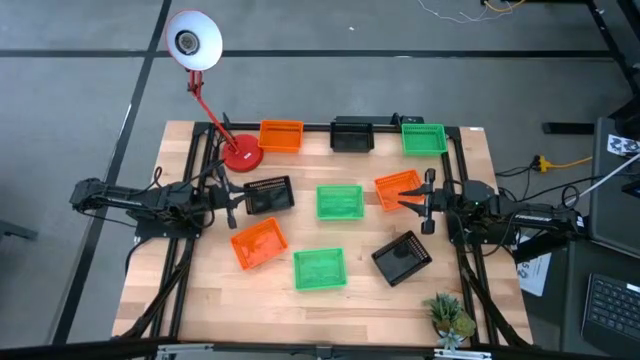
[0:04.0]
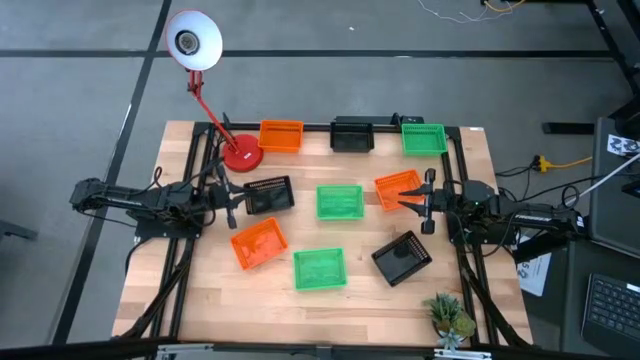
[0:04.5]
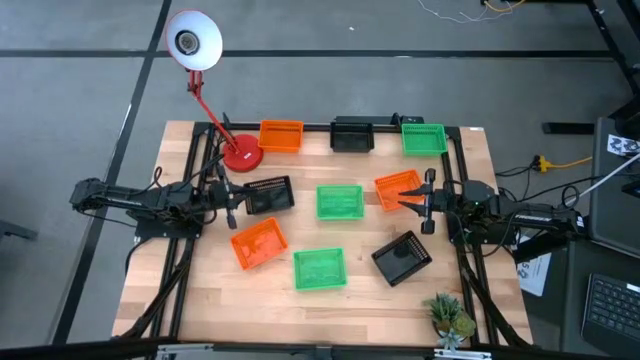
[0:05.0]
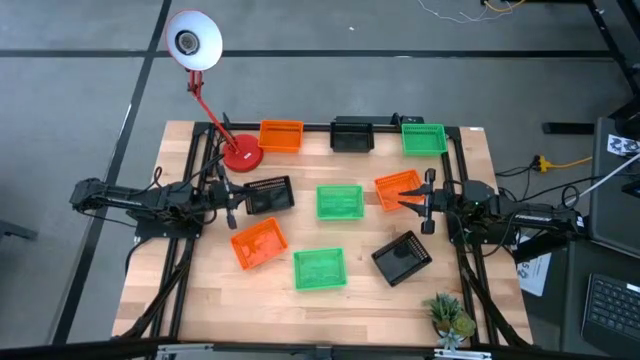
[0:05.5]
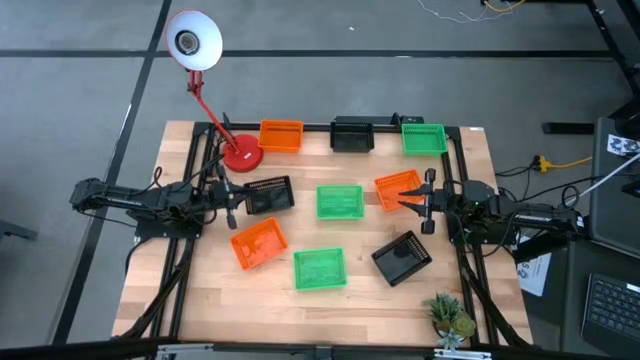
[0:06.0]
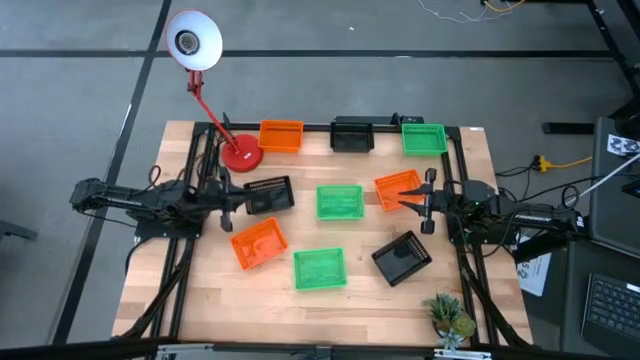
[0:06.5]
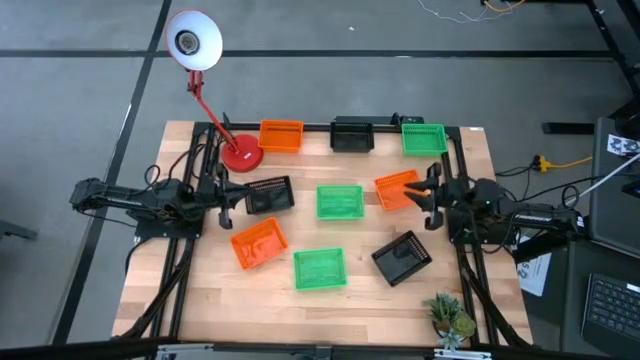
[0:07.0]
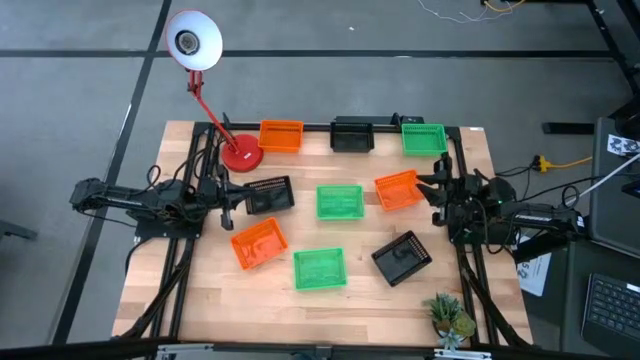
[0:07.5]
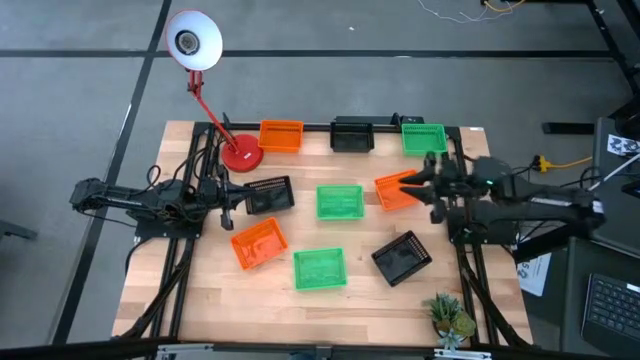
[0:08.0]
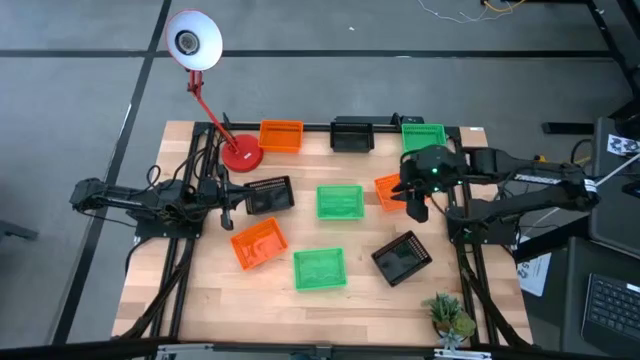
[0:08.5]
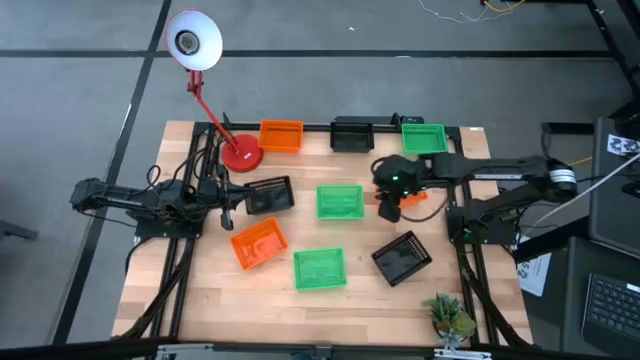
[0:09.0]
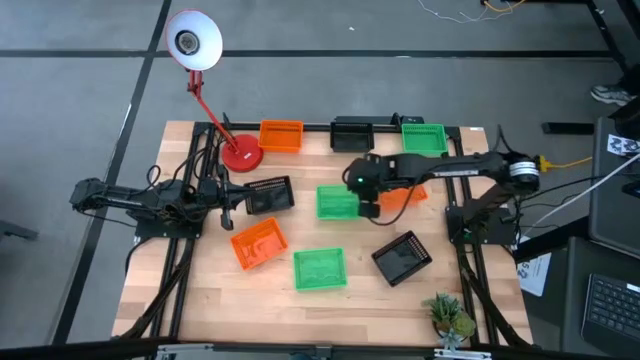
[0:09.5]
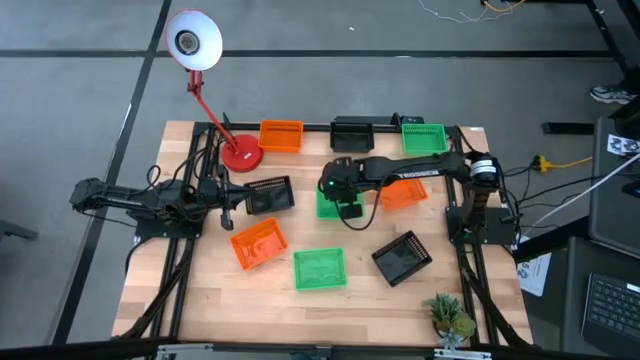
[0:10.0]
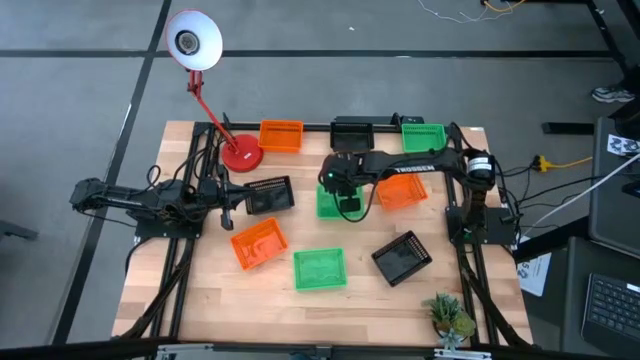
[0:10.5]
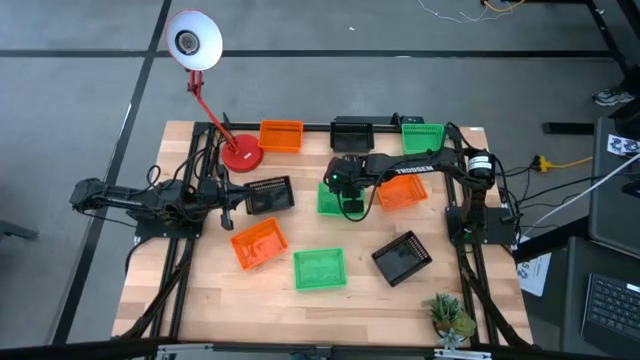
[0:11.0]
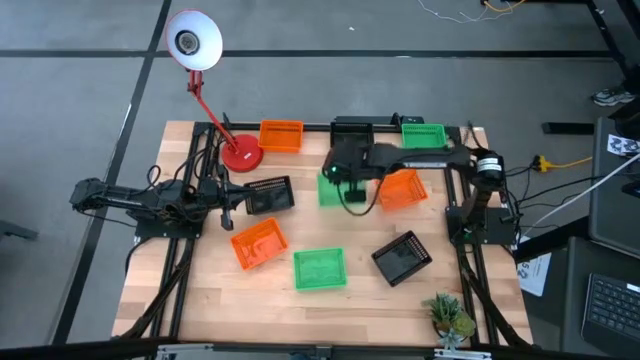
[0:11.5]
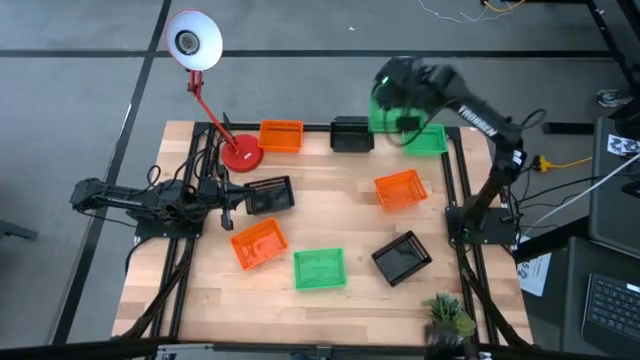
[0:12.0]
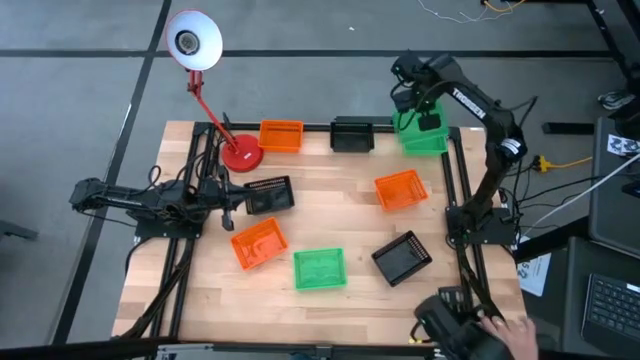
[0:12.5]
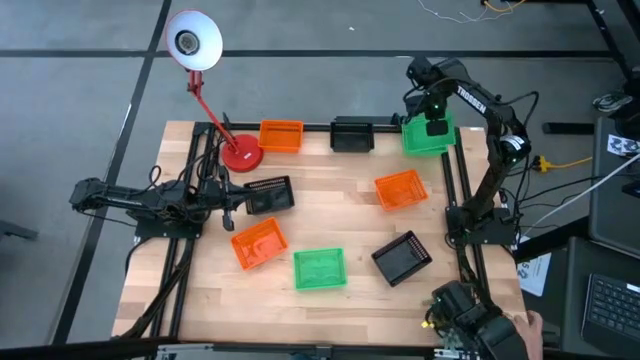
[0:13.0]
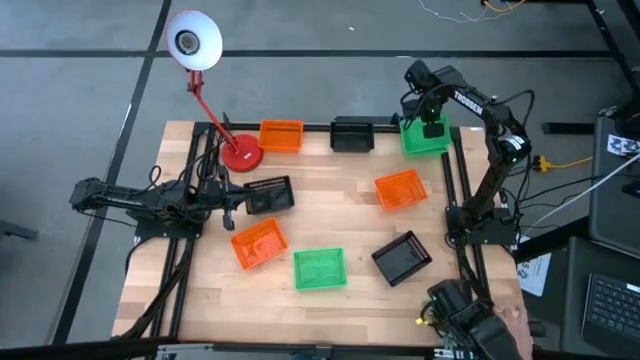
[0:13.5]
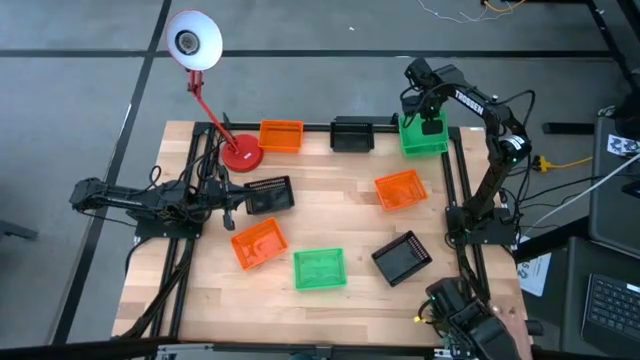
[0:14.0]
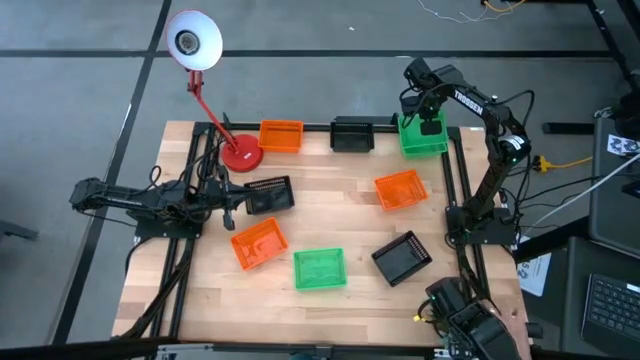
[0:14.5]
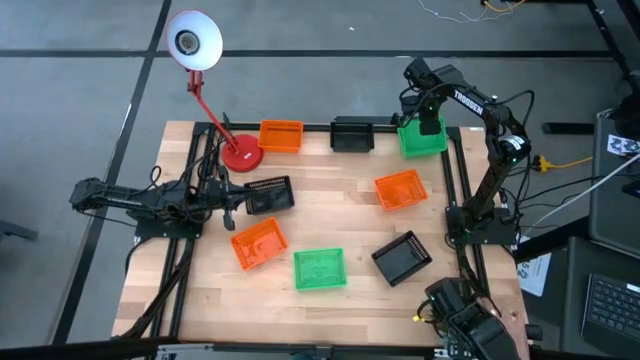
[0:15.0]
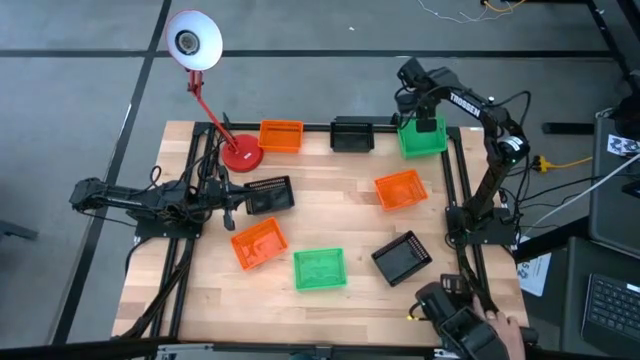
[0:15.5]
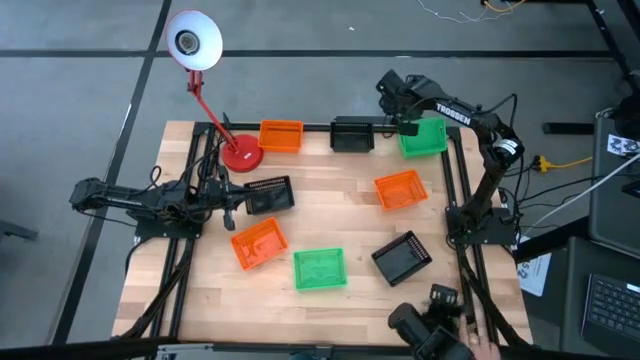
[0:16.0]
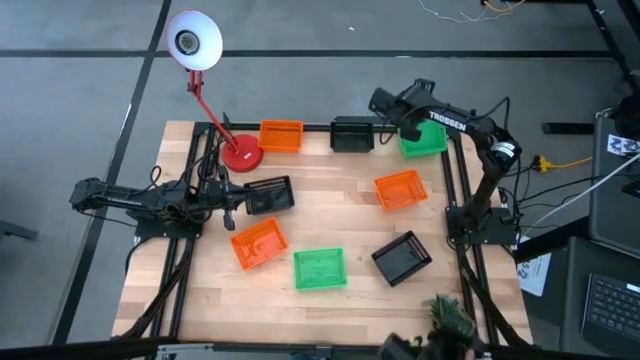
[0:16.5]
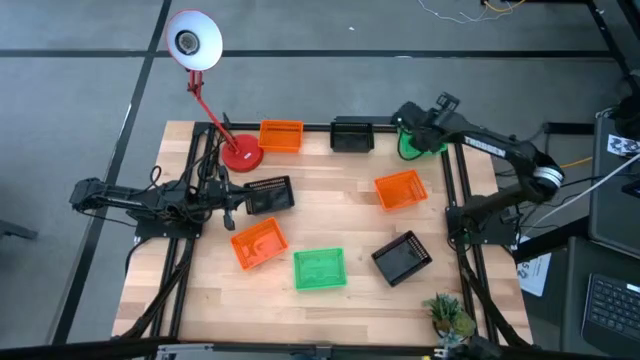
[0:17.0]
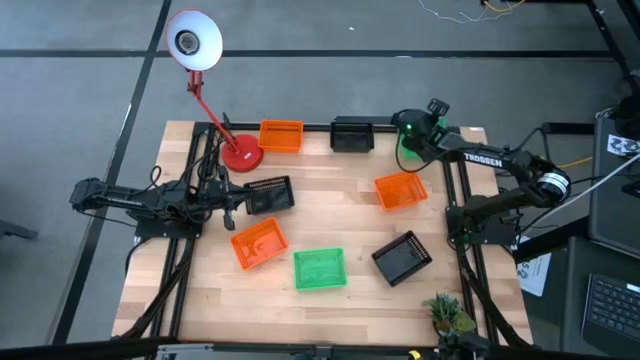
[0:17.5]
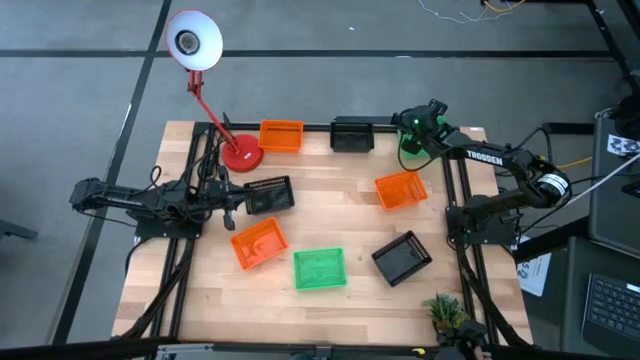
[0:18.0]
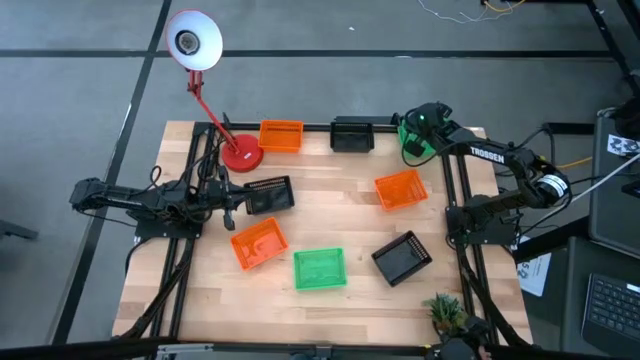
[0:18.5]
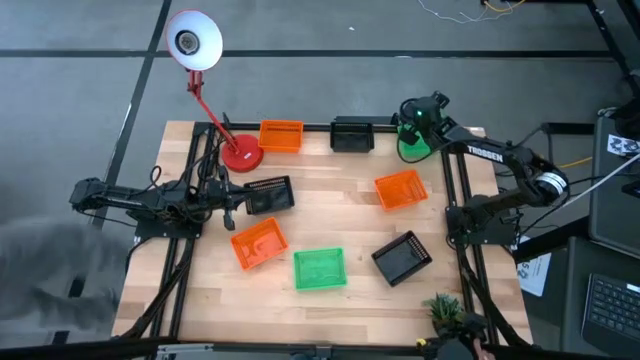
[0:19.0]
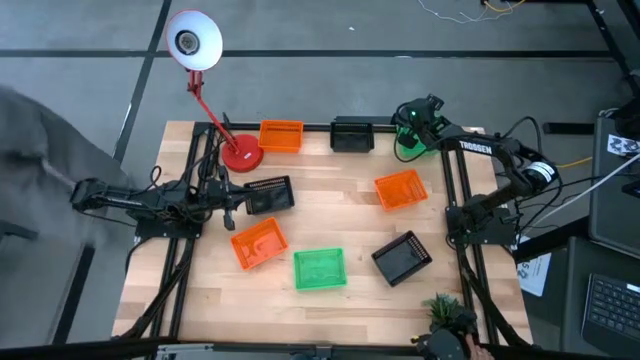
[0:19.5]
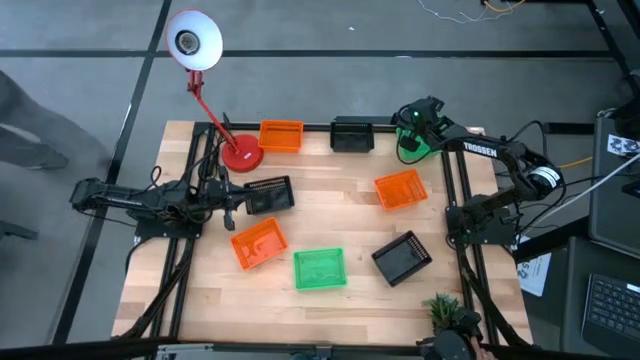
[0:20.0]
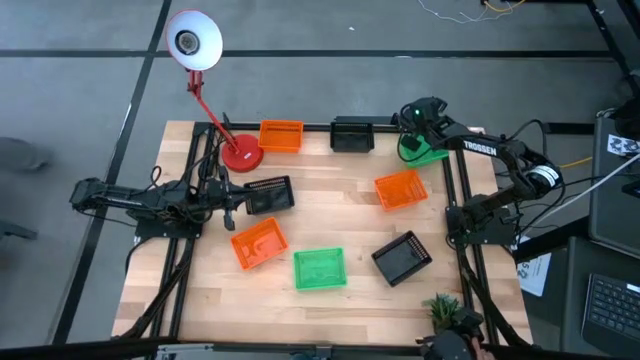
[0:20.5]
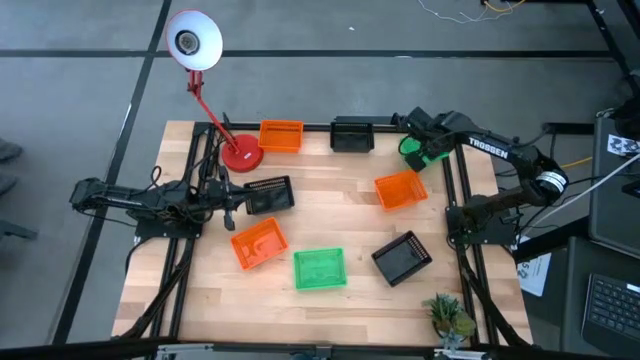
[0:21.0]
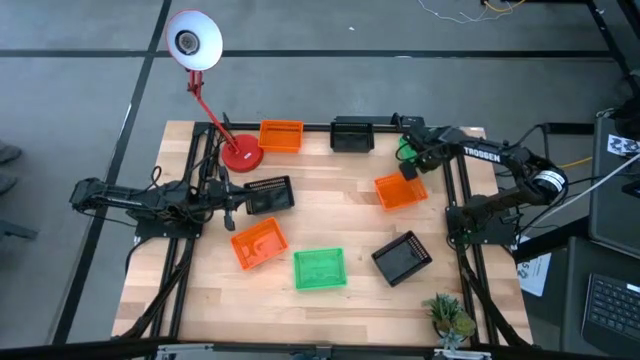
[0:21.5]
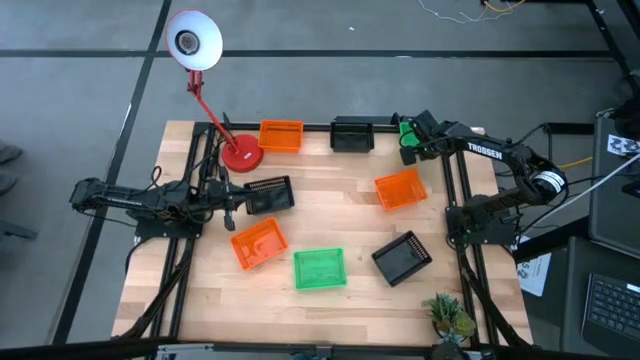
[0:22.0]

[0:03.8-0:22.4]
Stack the middle green bin on top of the top green bin

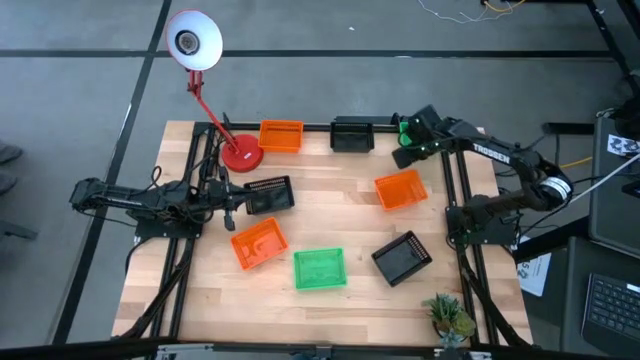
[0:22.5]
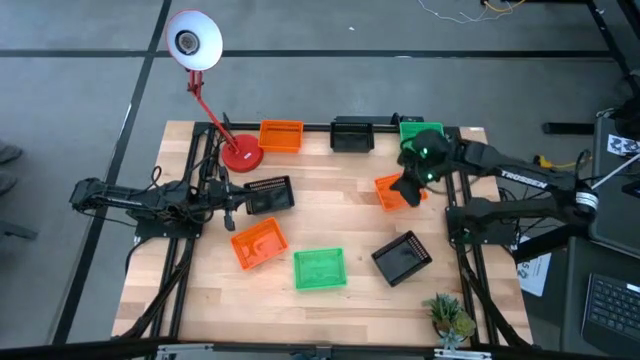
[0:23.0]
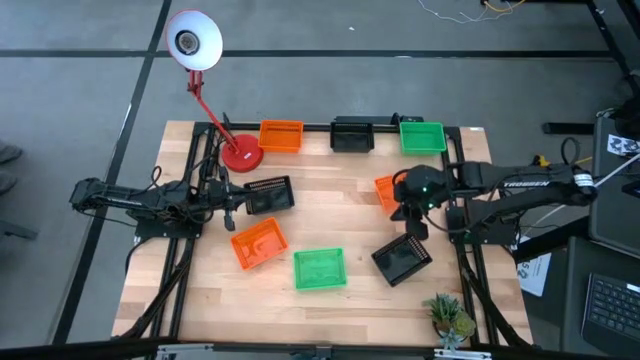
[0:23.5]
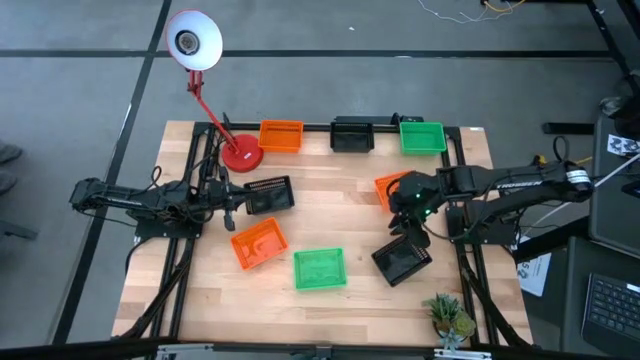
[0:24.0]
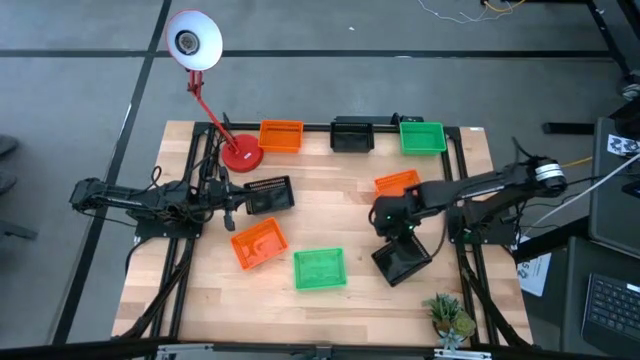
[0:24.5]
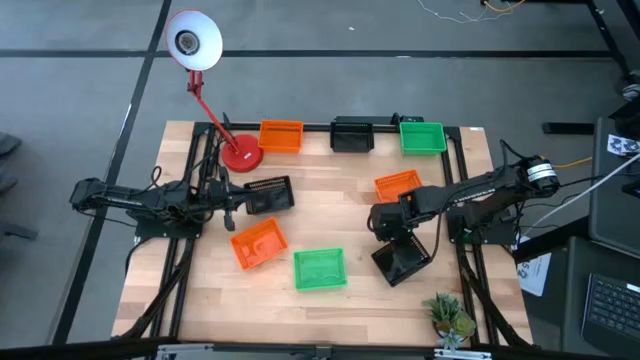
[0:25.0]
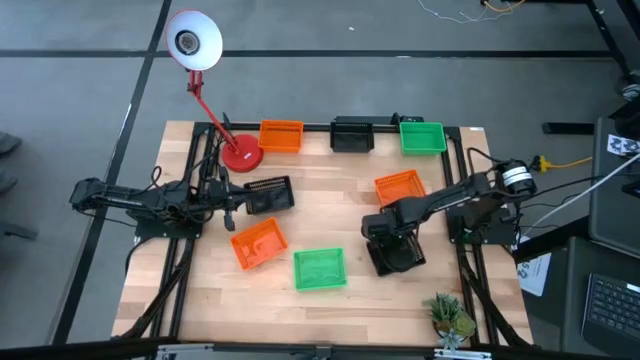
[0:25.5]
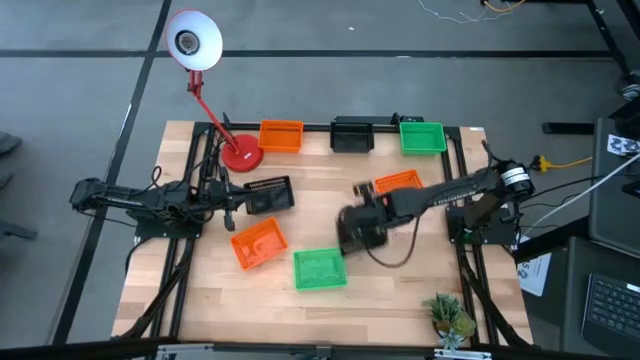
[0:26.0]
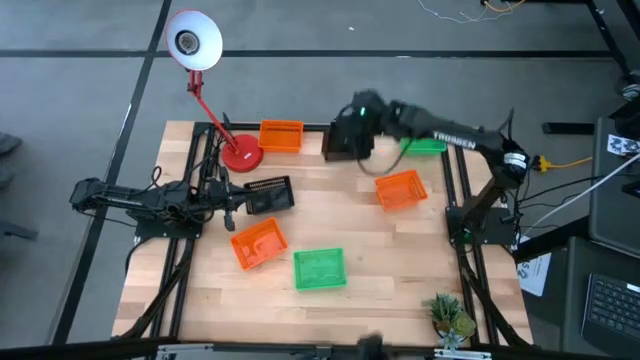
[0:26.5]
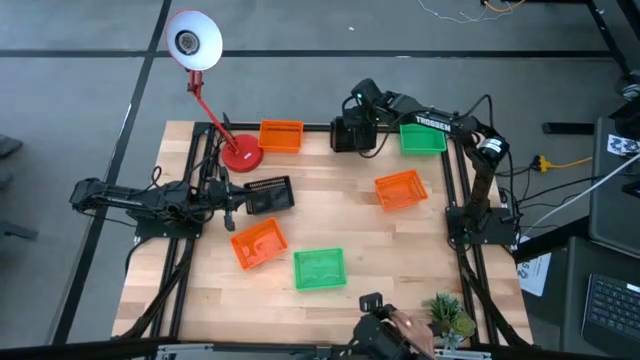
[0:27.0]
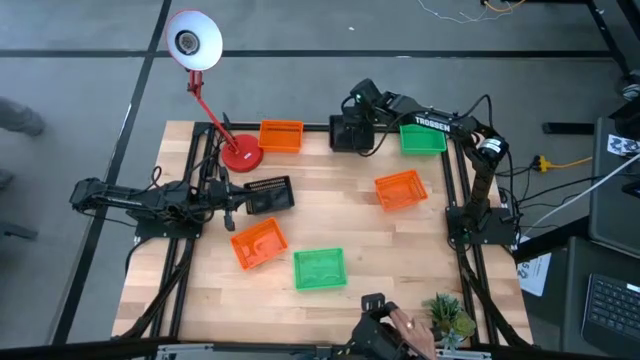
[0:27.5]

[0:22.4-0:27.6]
Stack the bottom black bin on top of the top black bin
